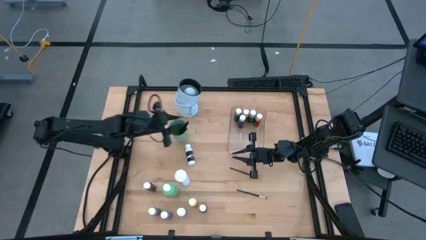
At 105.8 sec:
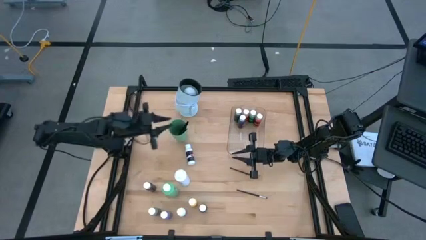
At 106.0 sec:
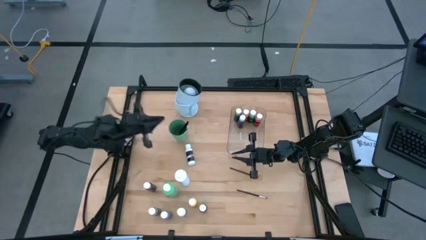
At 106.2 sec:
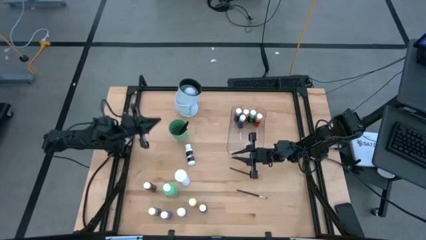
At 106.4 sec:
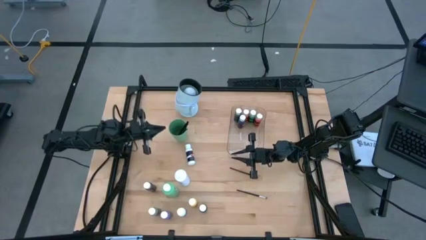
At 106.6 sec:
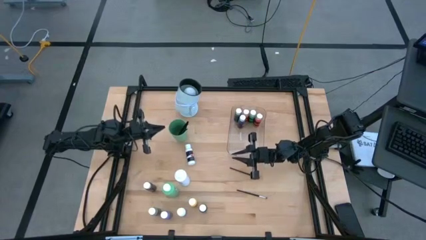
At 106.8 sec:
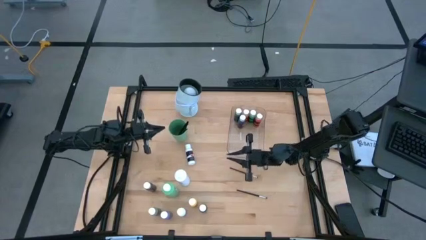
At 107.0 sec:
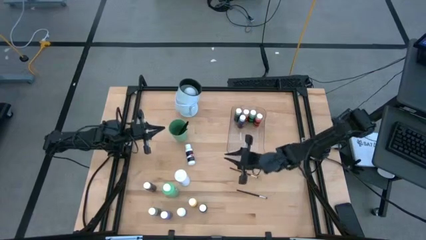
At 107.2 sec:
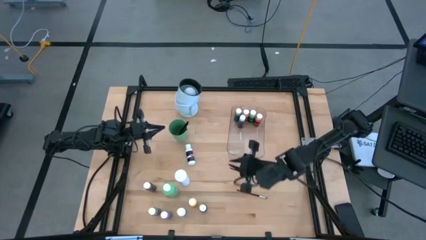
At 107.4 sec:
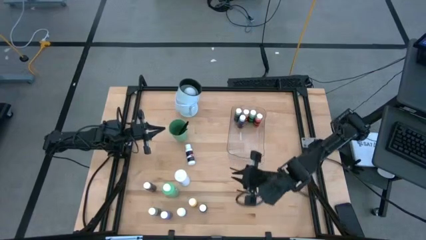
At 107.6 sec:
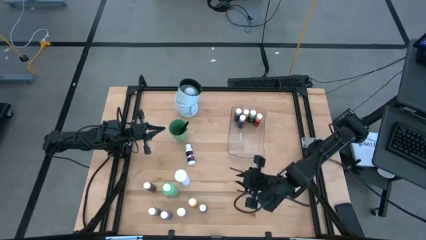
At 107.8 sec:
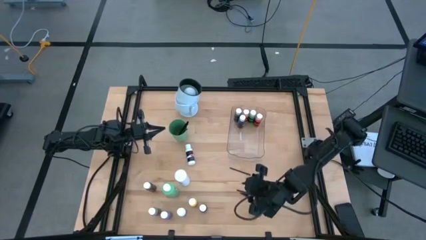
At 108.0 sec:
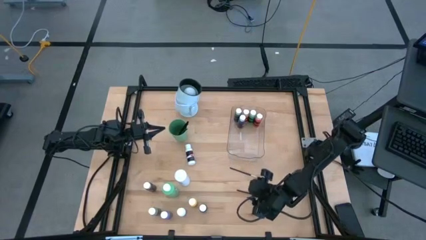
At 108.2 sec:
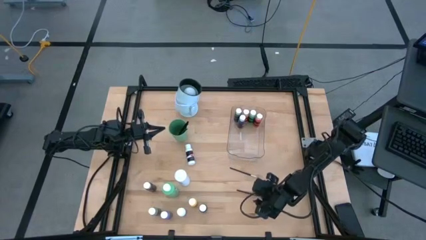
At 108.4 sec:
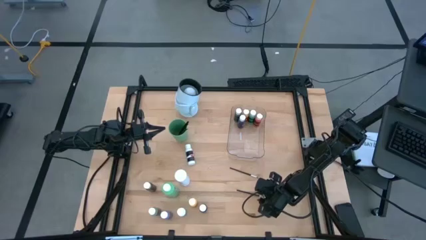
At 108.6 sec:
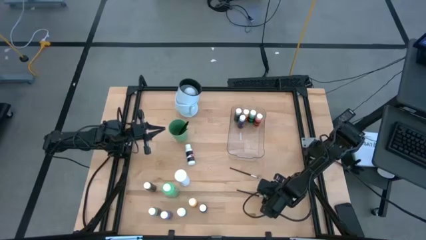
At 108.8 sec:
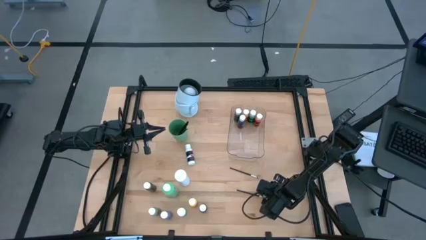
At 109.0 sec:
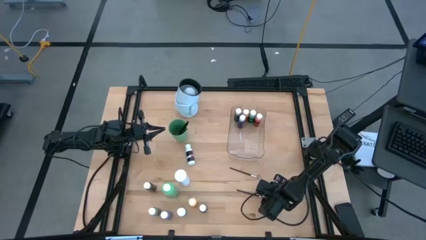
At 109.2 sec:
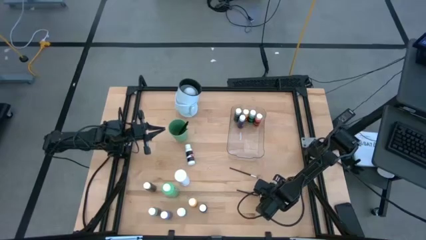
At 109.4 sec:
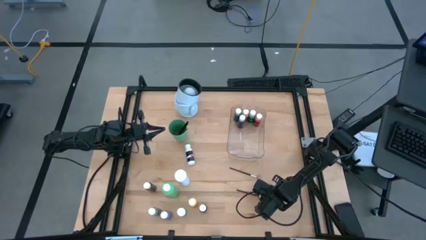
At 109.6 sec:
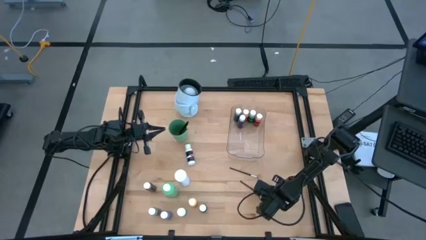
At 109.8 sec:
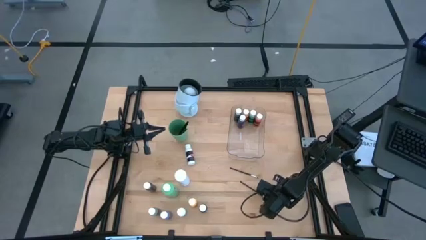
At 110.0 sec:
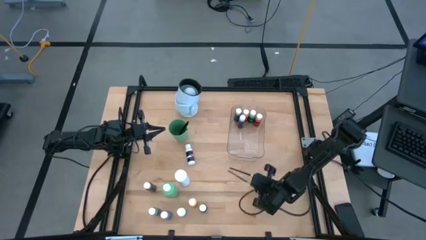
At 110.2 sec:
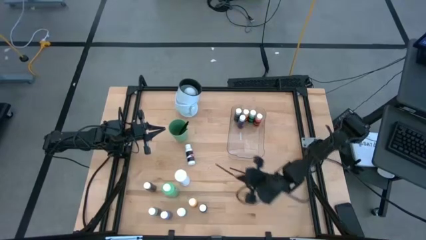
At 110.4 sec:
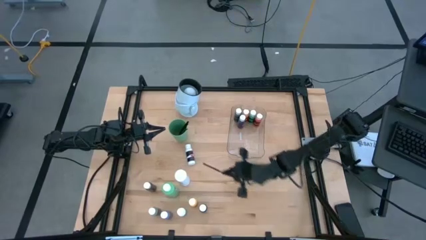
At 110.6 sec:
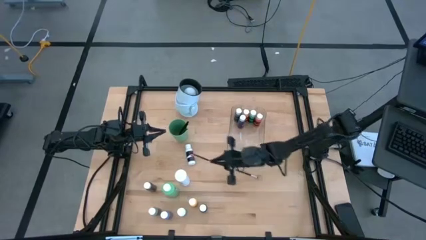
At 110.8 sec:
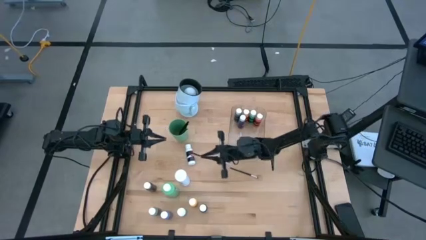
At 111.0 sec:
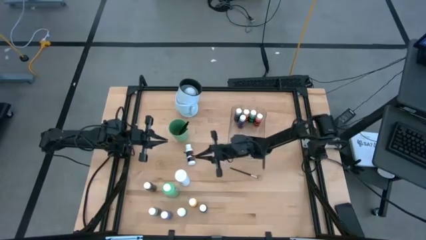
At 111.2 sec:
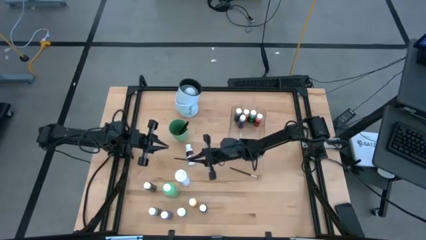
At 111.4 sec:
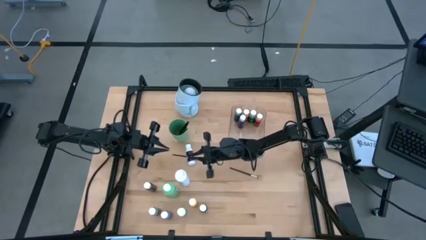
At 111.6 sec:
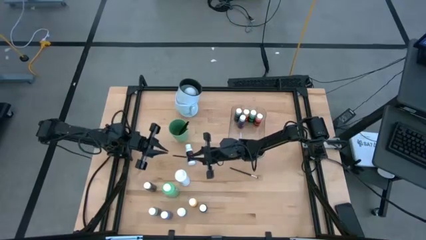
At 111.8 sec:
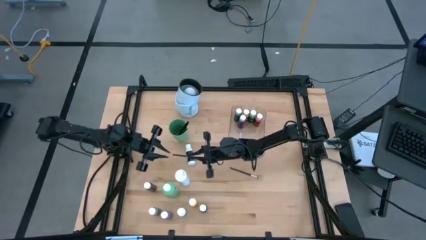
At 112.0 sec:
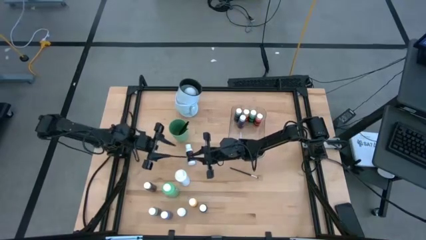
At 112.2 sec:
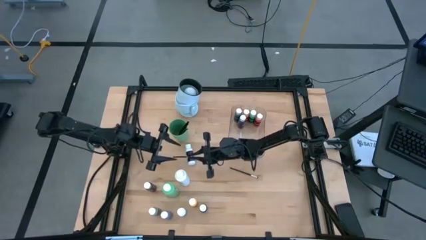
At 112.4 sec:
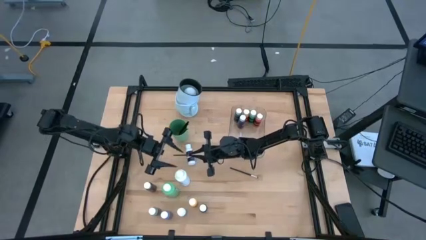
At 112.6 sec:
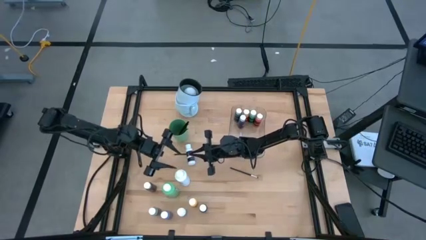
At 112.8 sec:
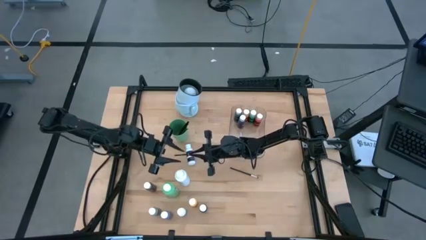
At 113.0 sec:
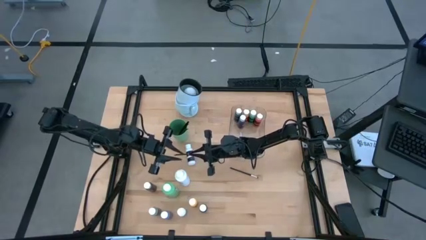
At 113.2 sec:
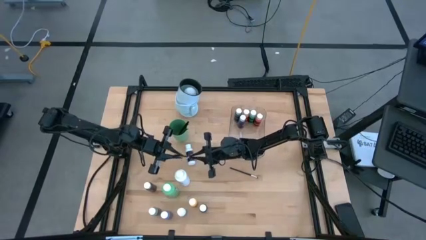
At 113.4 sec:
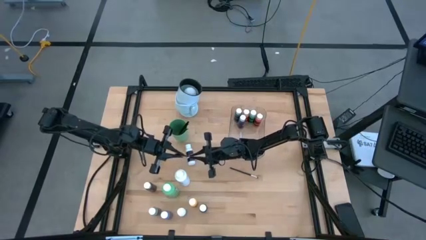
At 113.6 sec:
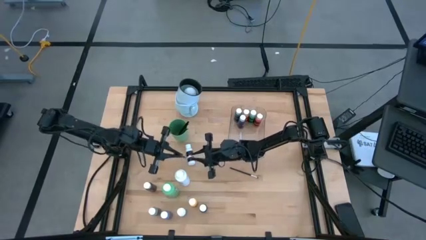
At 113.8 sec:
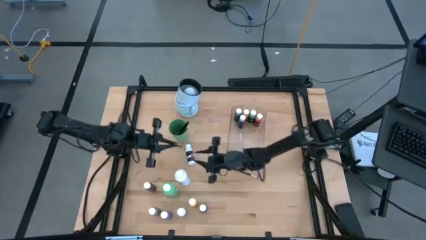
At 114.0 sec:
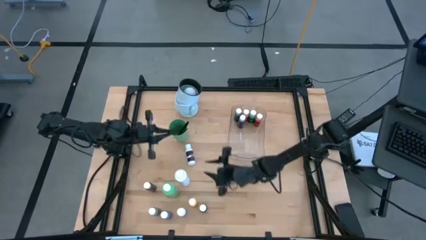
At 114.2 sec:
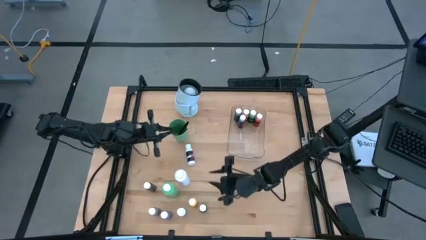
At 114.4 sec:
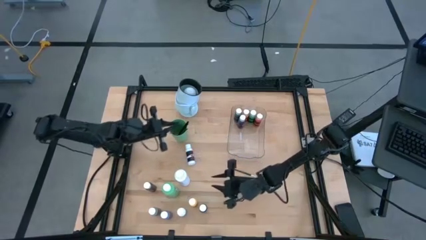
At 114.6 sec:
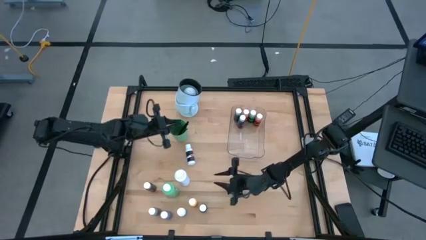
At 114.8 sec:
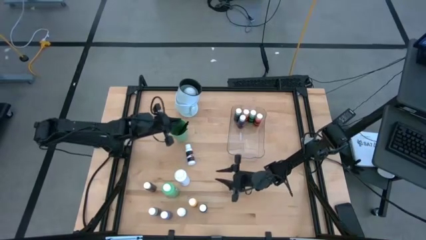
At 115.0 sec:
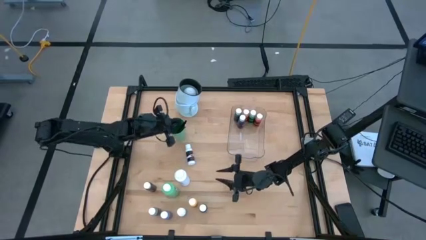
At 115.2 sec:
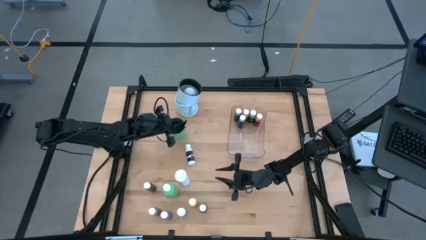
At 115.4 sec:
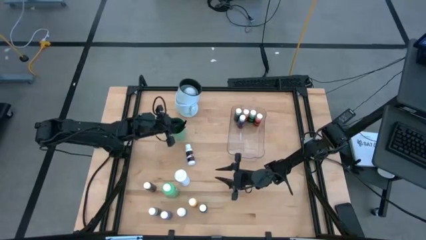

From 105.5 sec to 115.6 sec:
Task: Pick & Place Paint Supplies
Put the bottom paint brush into the cup
